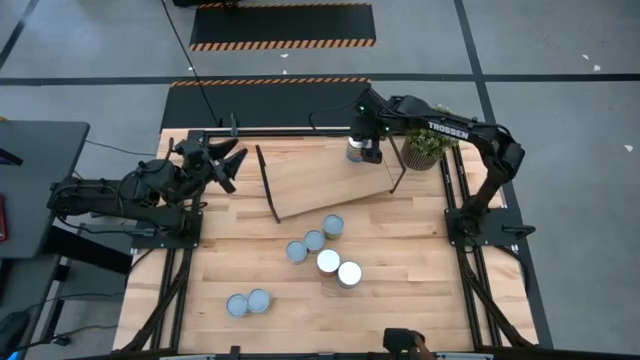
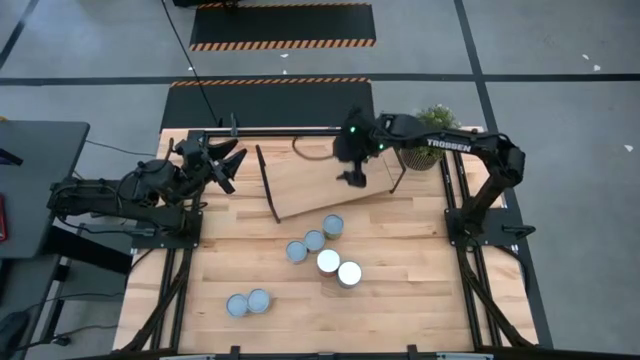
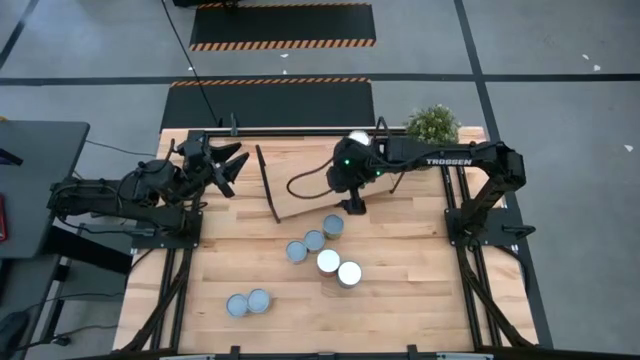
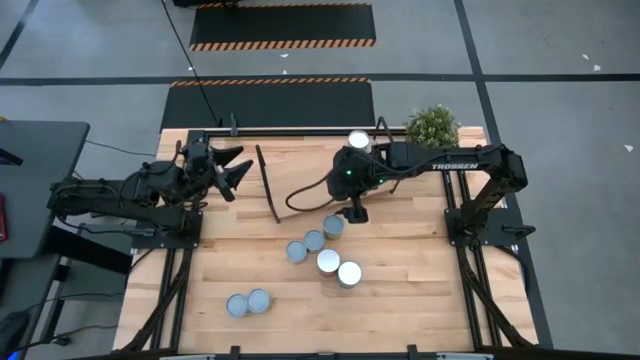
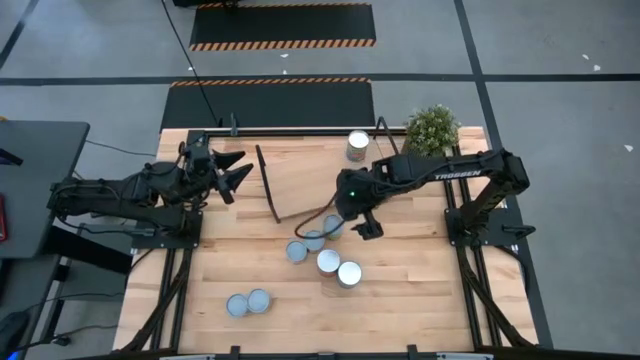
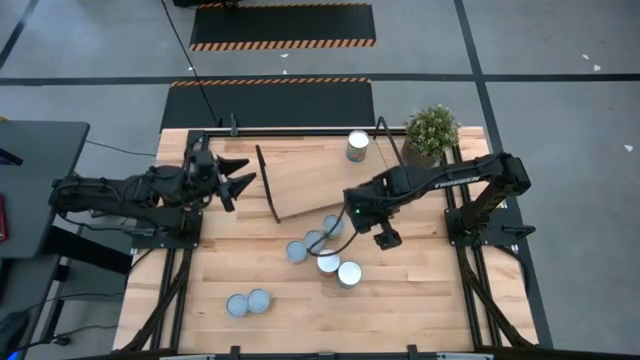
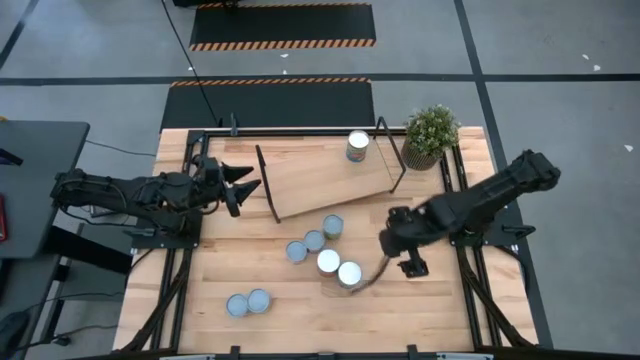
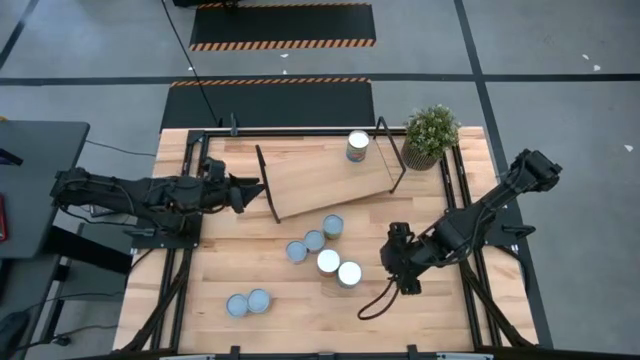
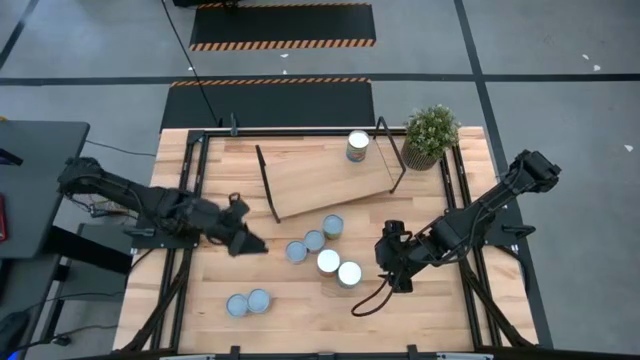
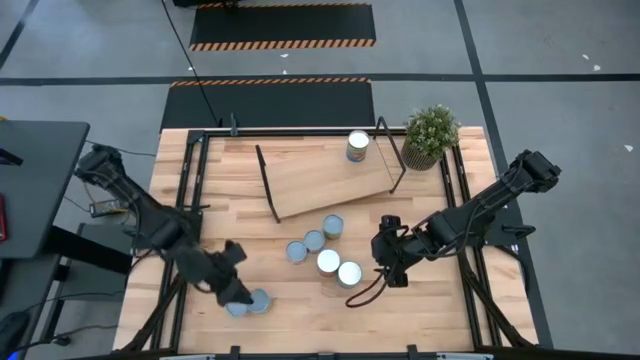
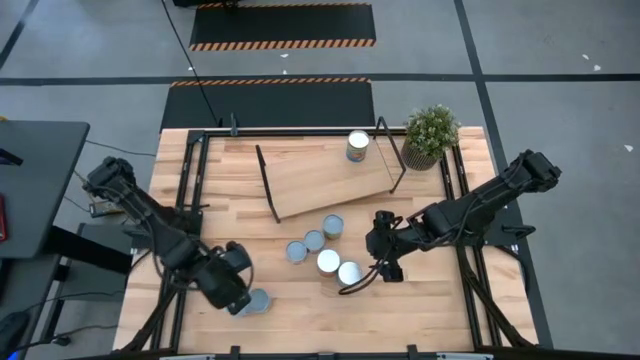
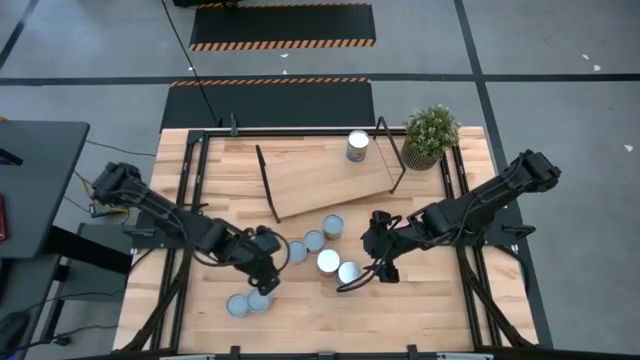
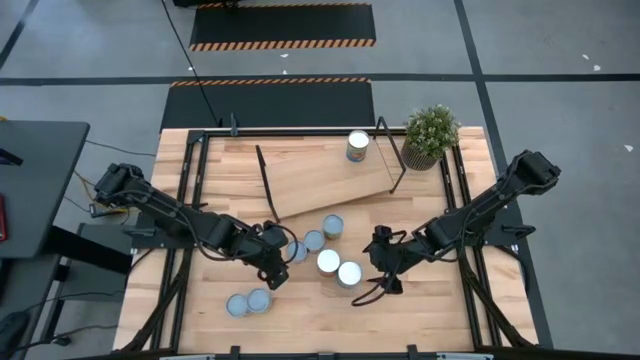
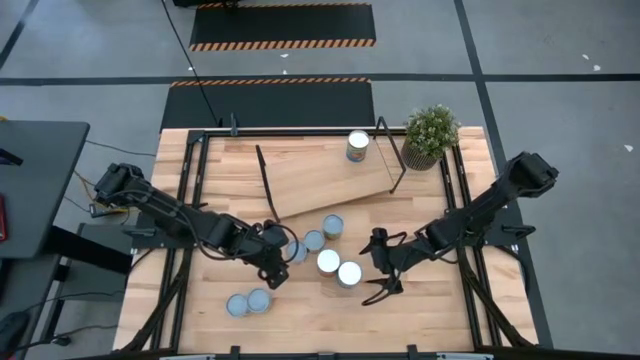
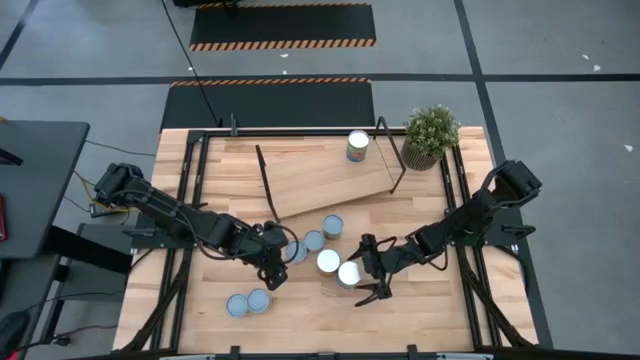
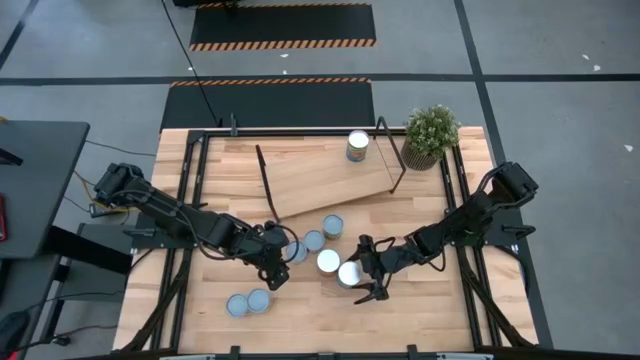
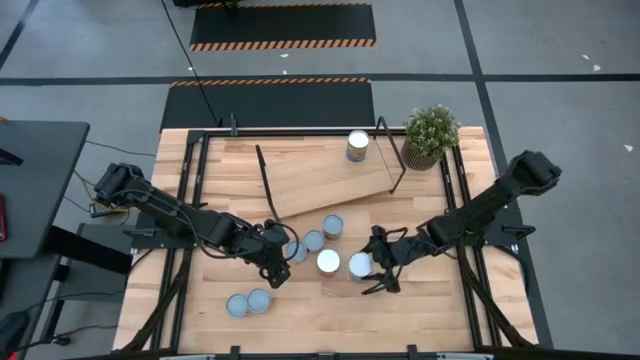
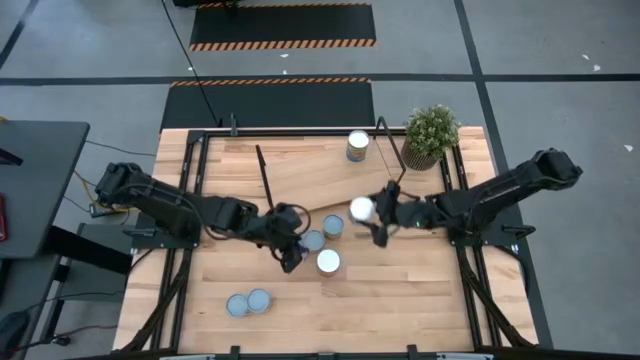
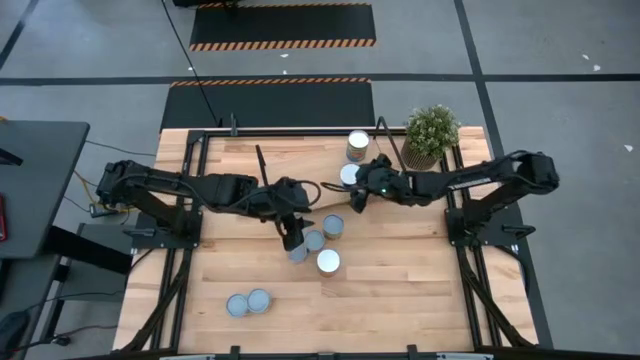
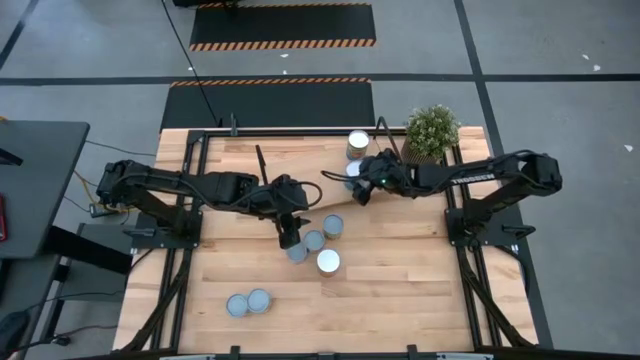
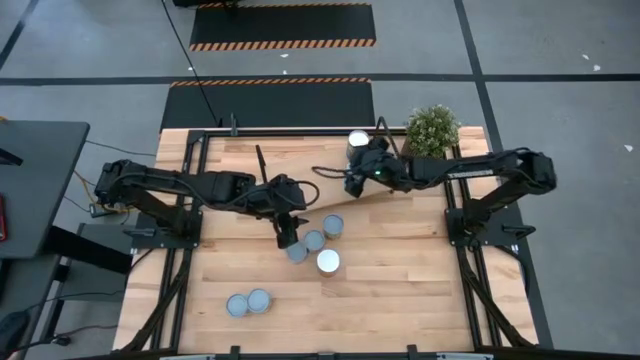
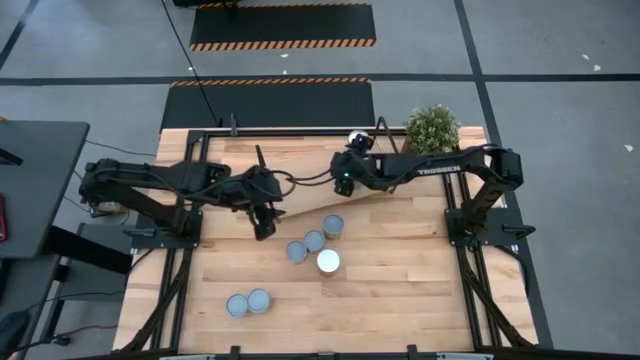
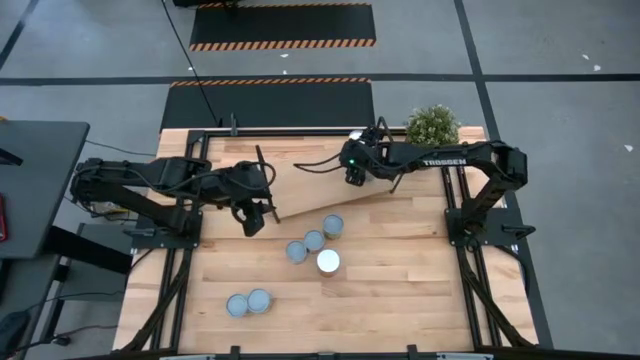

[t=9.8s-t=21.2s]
Task: Pick and place cans onto a shelf
Put the blue can on the shelf

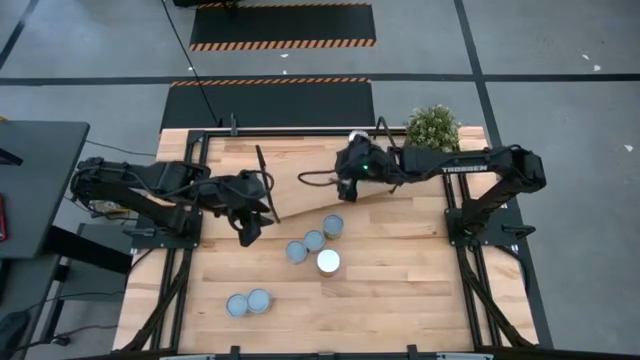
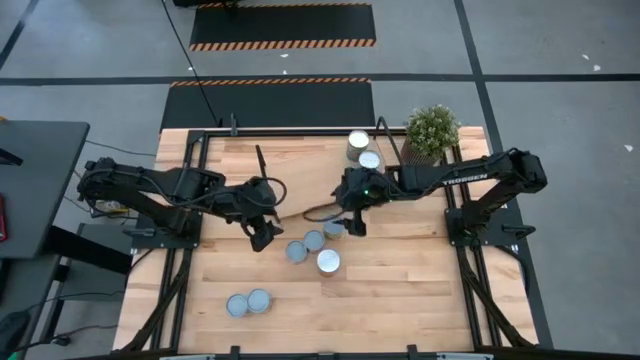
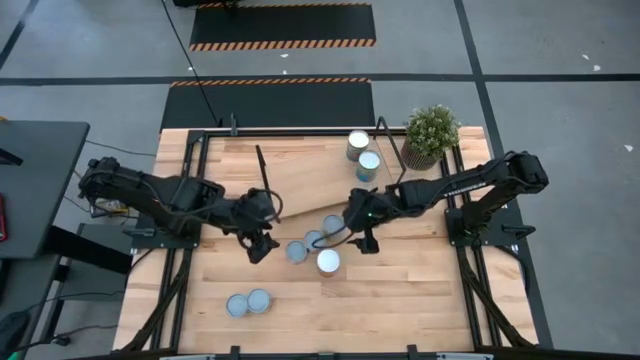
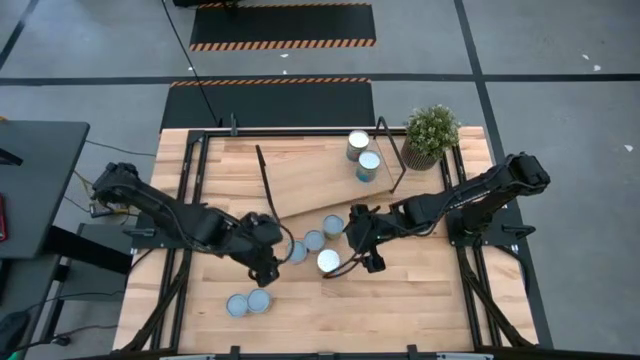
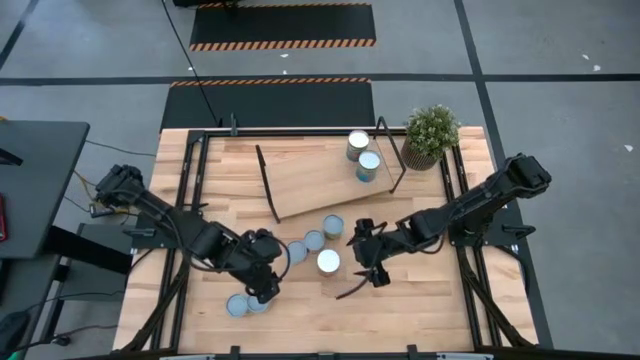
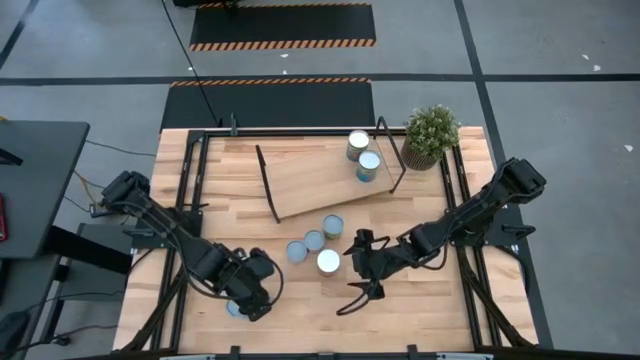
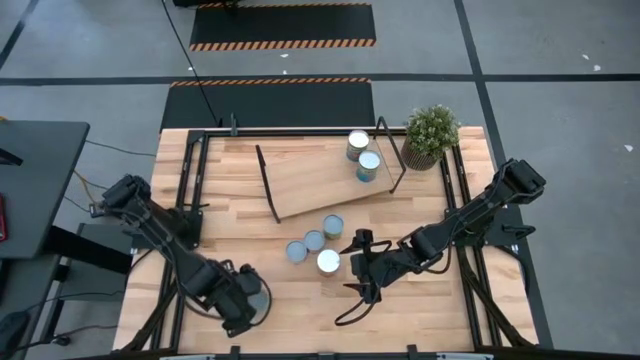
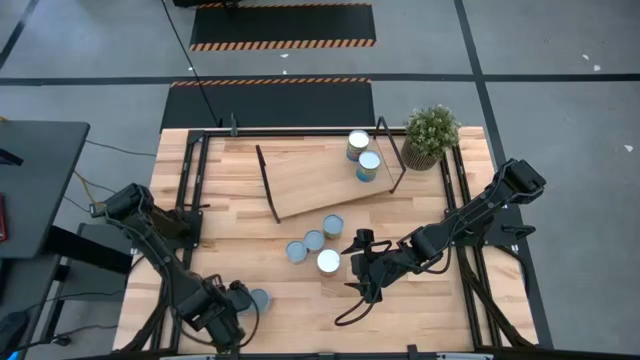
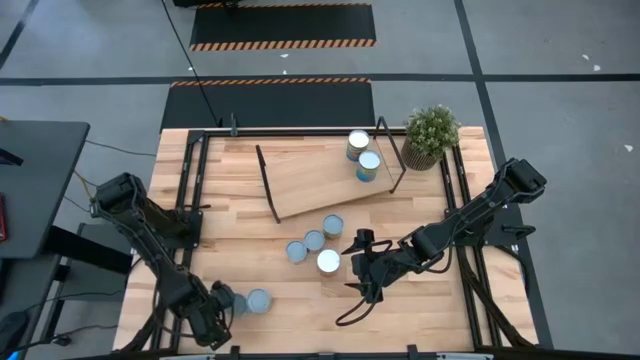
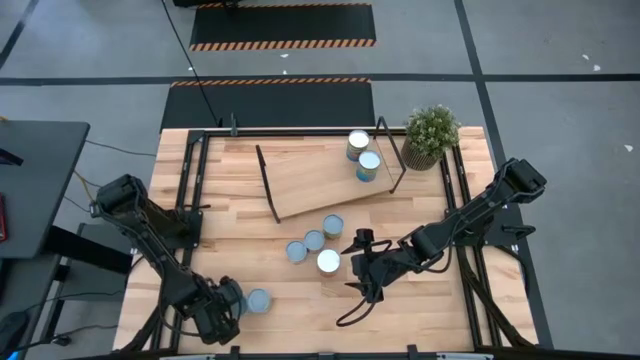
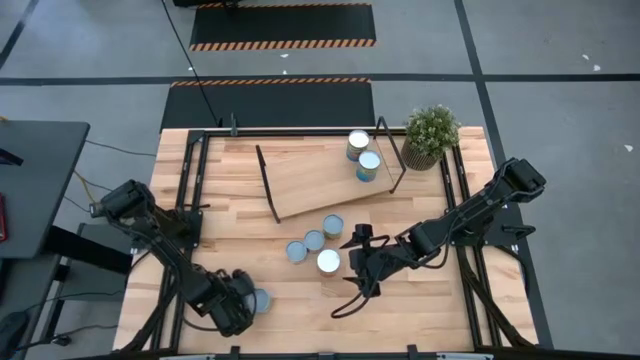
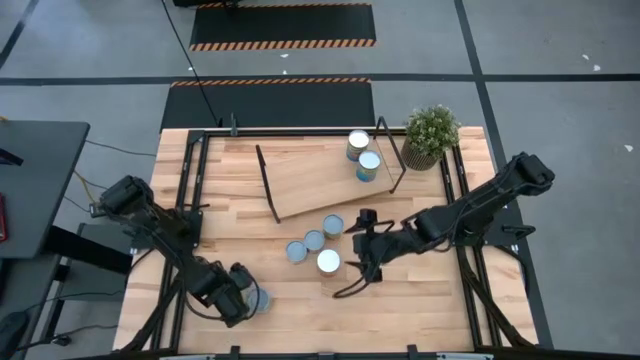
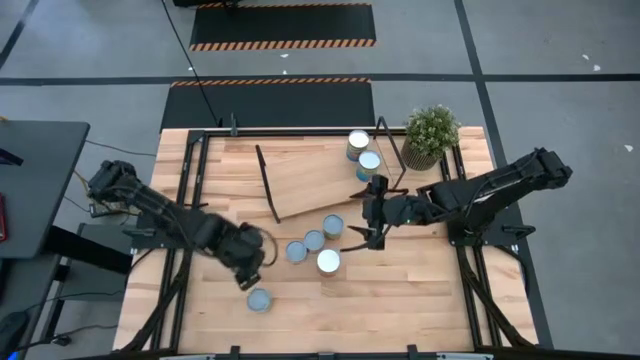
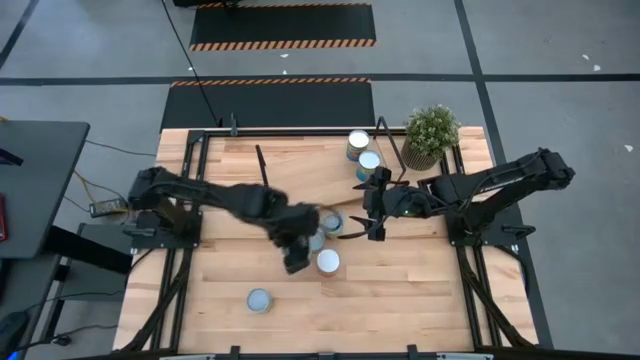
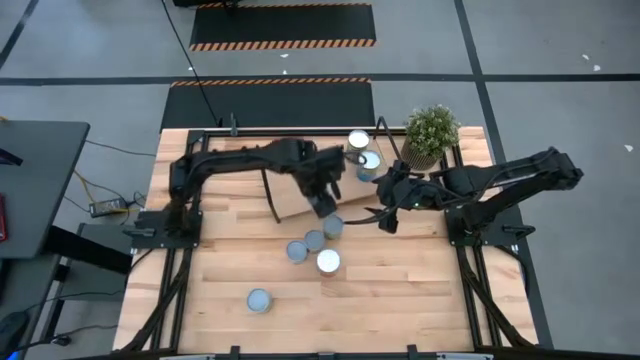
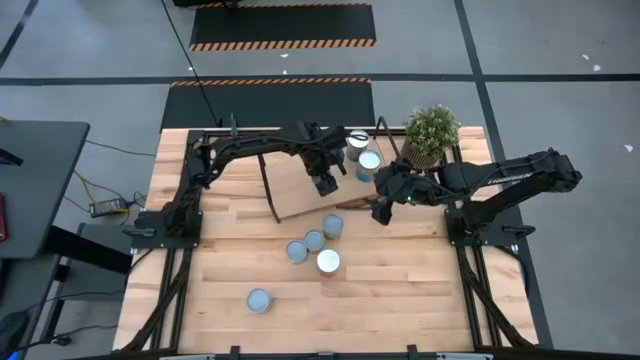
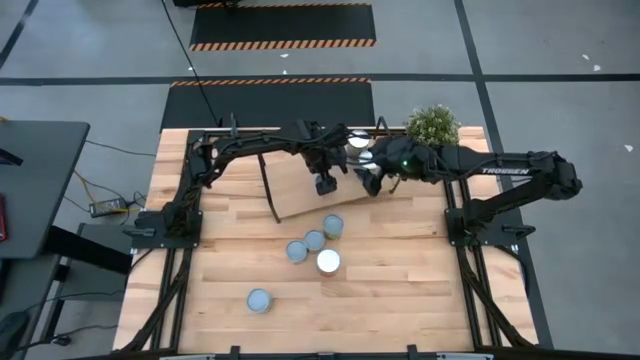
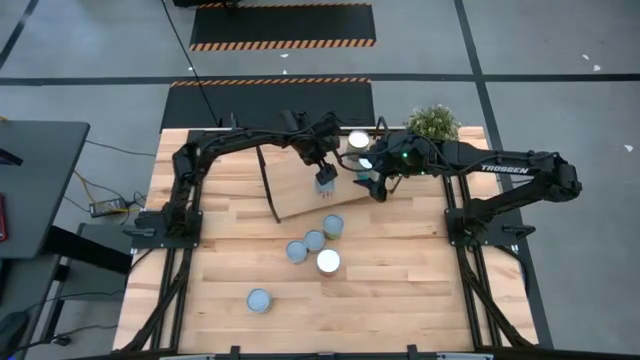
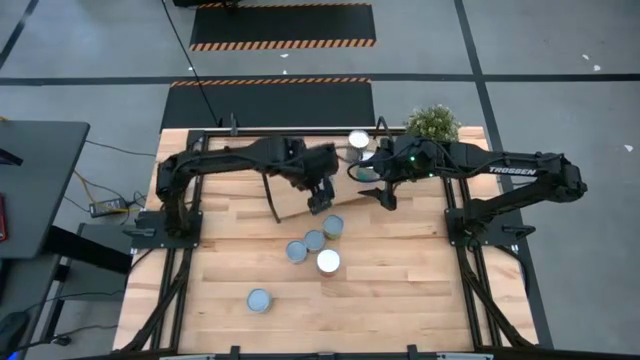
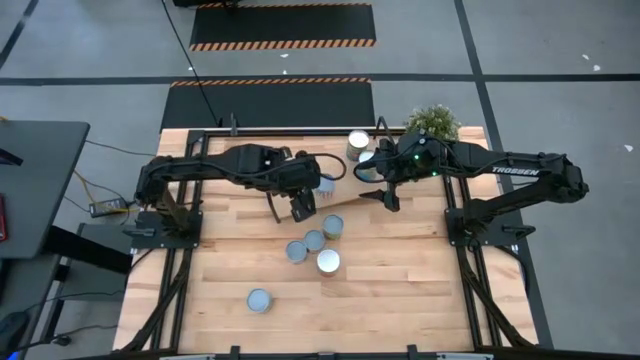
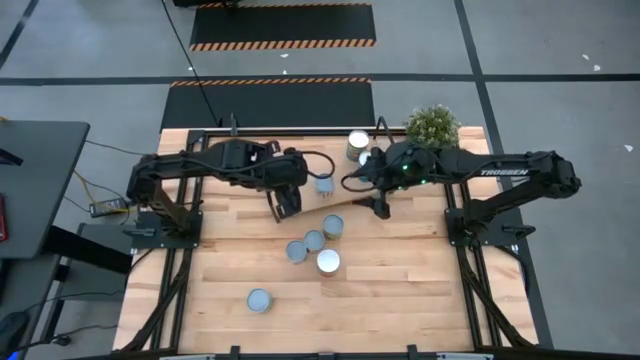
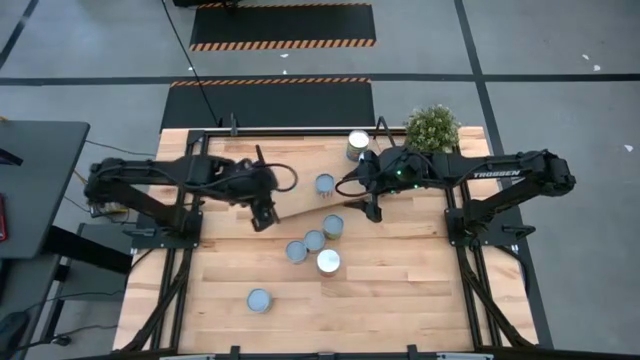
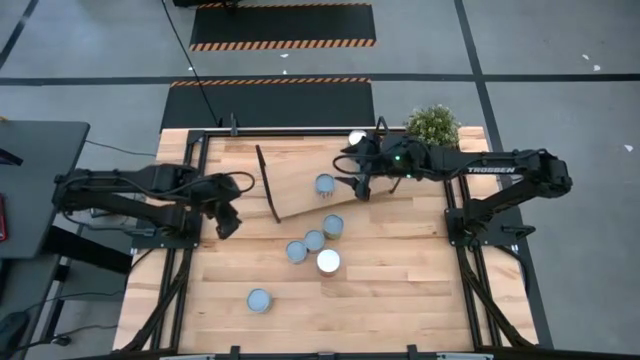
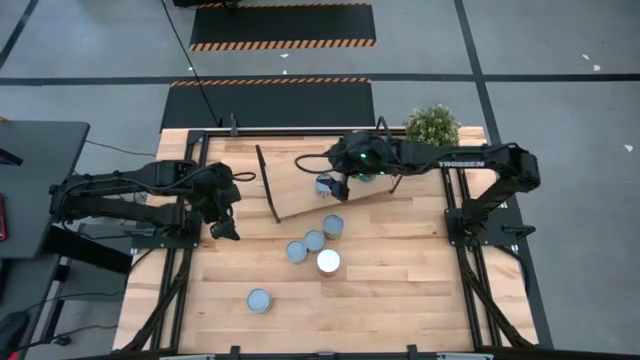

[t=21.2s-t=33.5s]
Put the white can on the shelf
